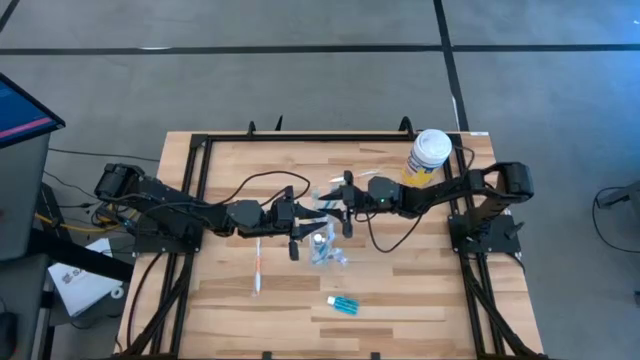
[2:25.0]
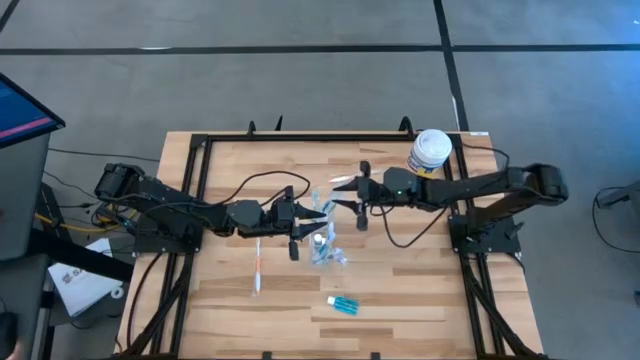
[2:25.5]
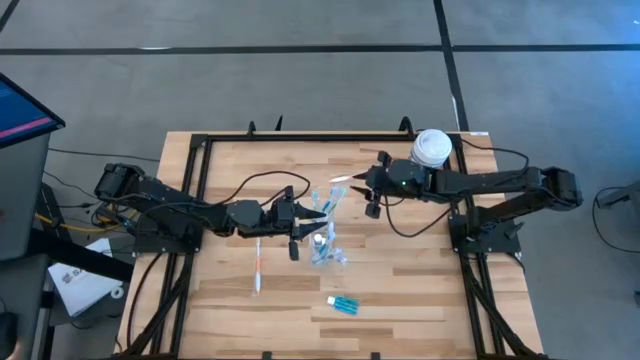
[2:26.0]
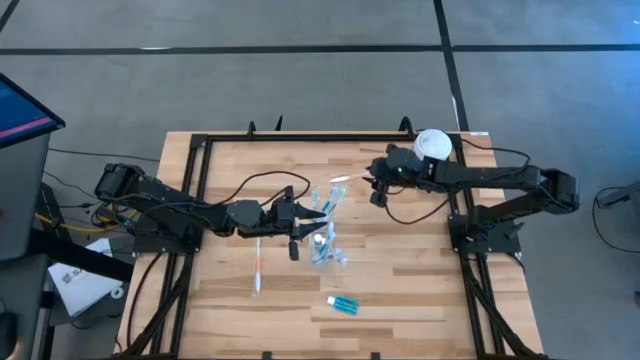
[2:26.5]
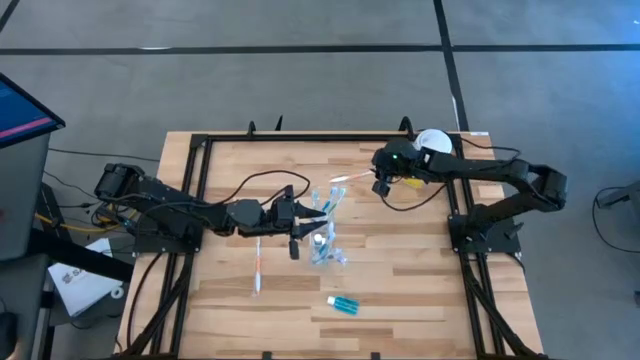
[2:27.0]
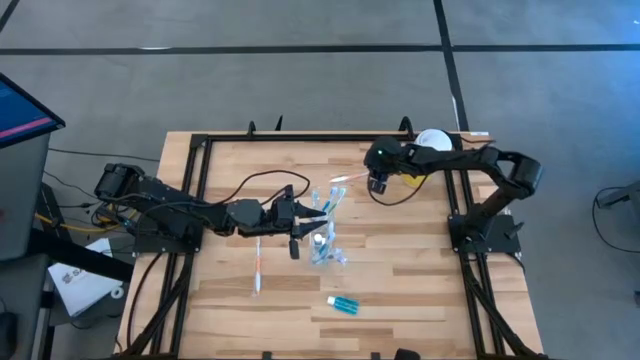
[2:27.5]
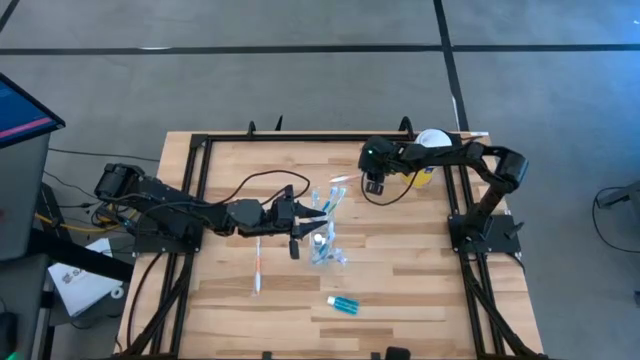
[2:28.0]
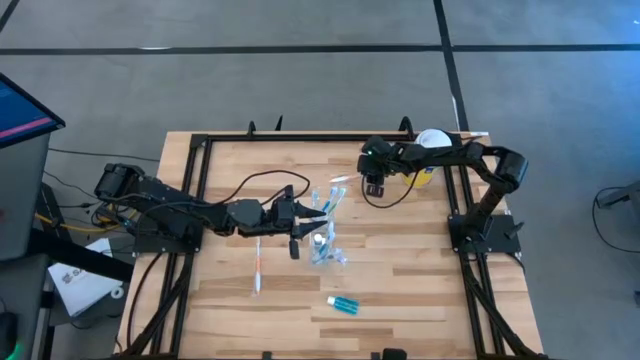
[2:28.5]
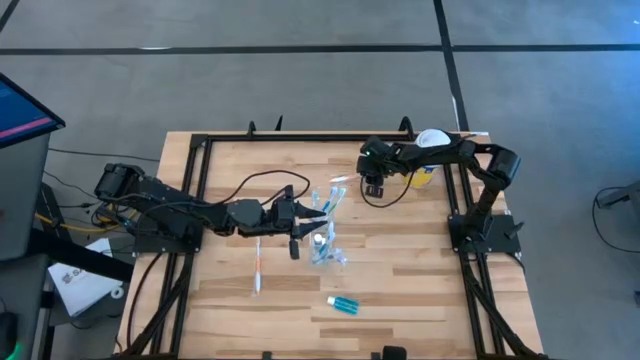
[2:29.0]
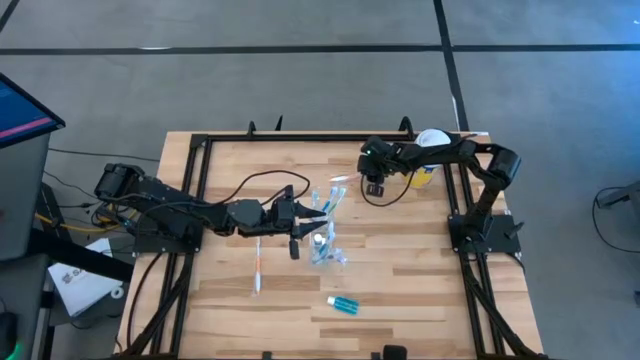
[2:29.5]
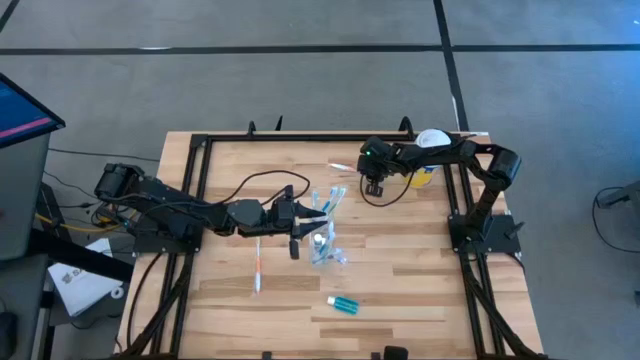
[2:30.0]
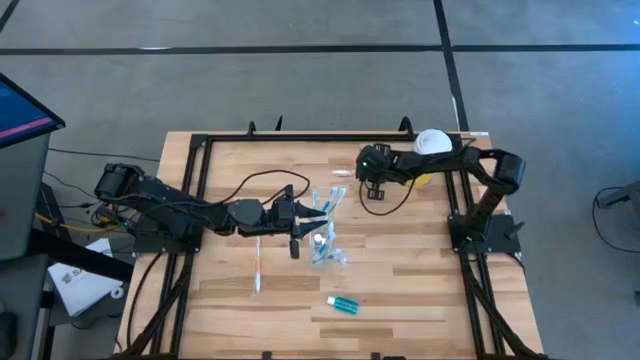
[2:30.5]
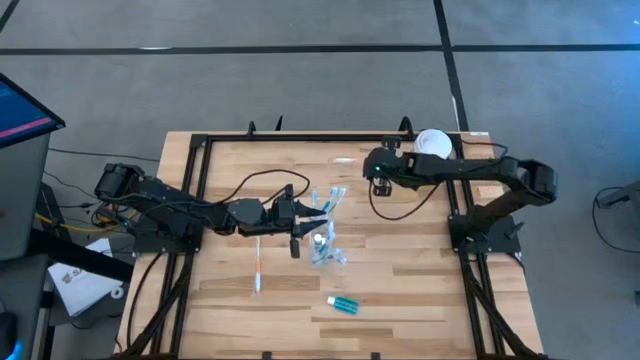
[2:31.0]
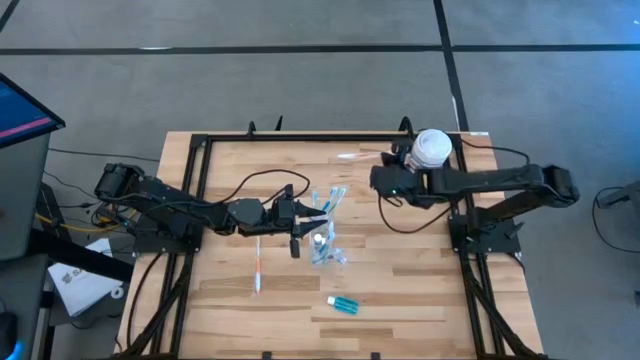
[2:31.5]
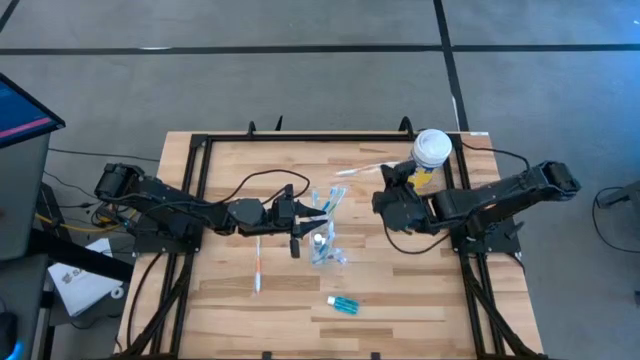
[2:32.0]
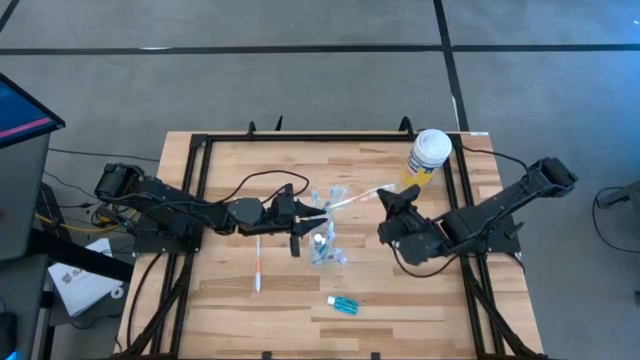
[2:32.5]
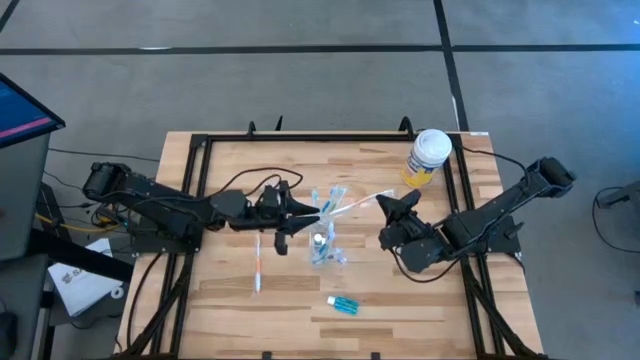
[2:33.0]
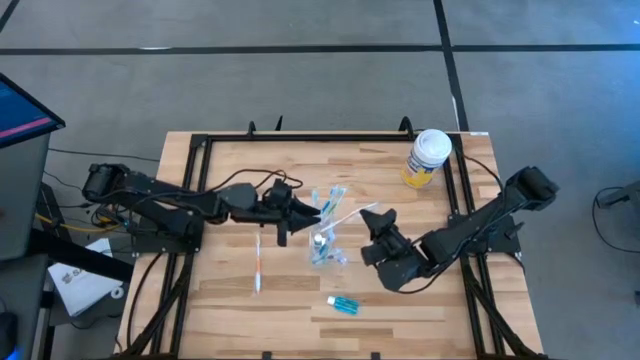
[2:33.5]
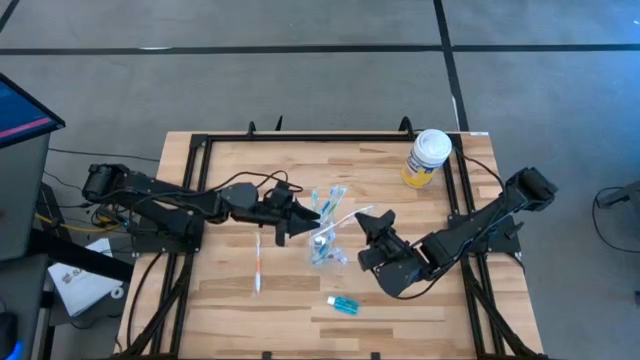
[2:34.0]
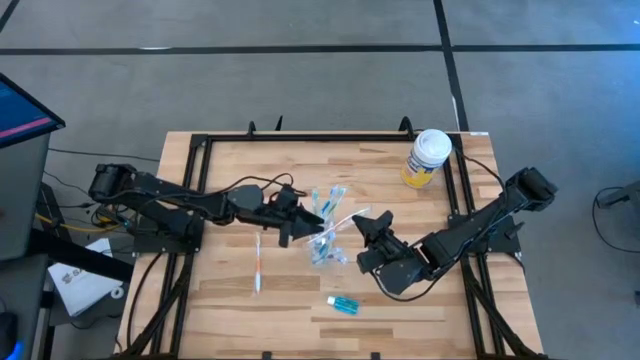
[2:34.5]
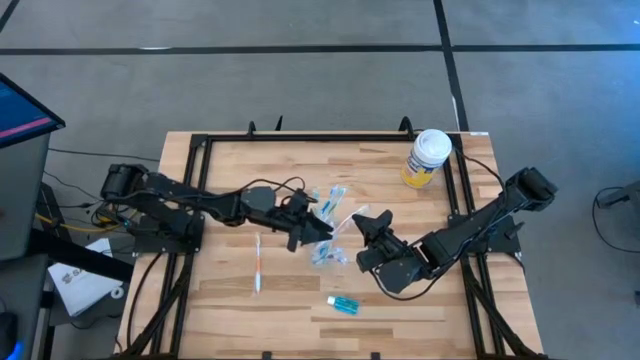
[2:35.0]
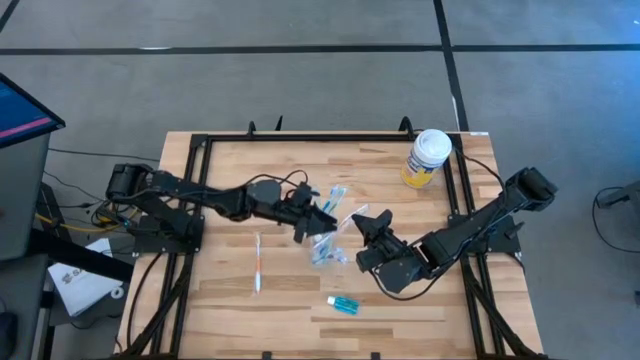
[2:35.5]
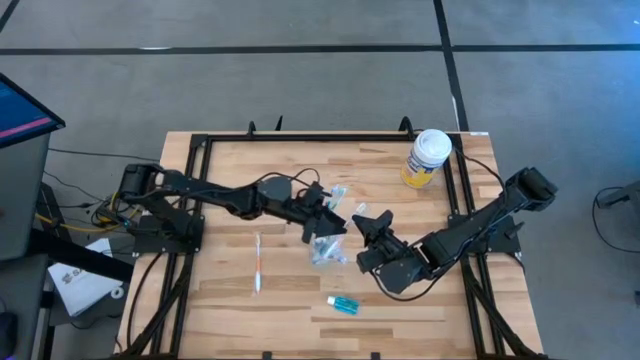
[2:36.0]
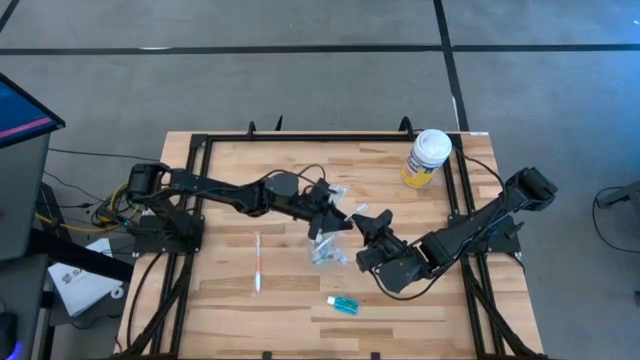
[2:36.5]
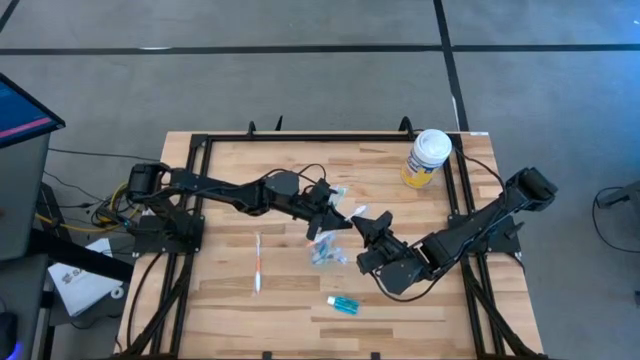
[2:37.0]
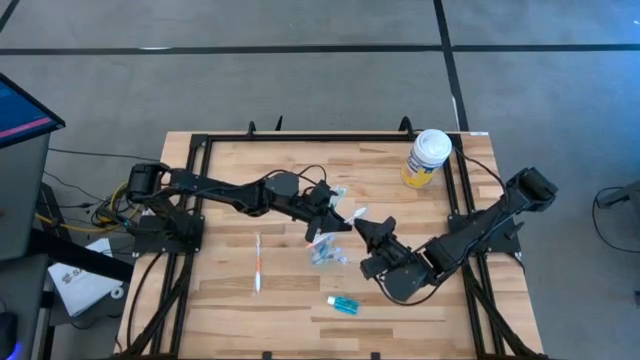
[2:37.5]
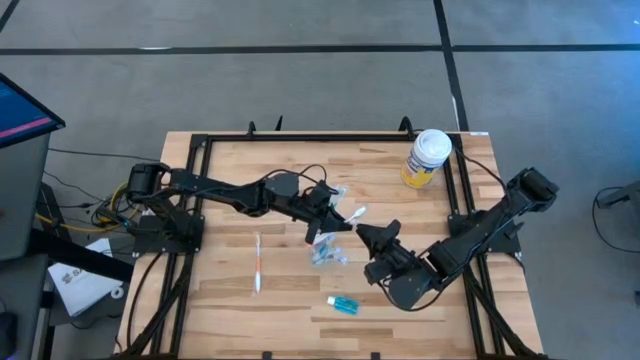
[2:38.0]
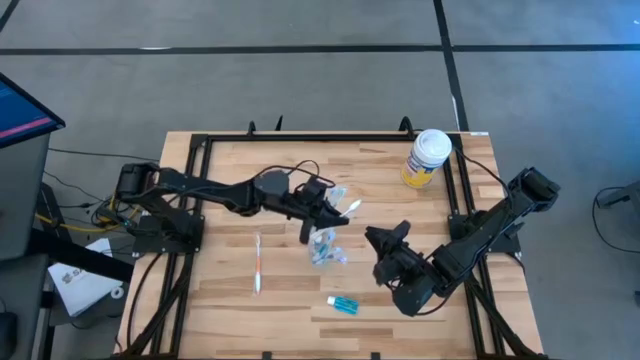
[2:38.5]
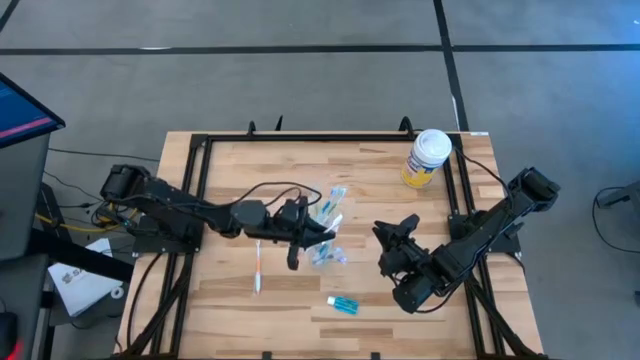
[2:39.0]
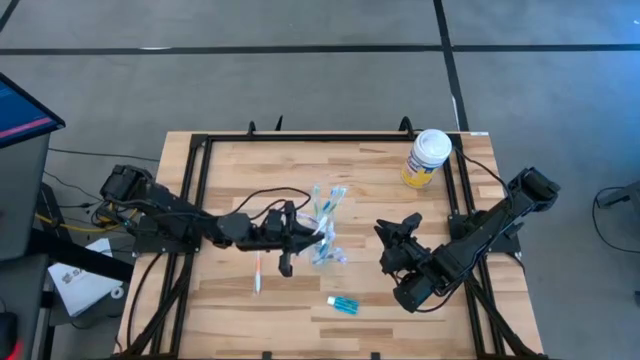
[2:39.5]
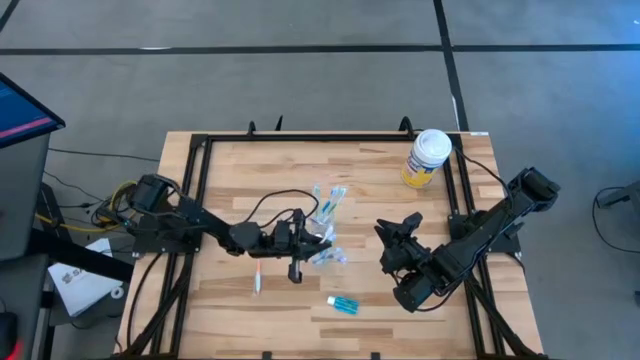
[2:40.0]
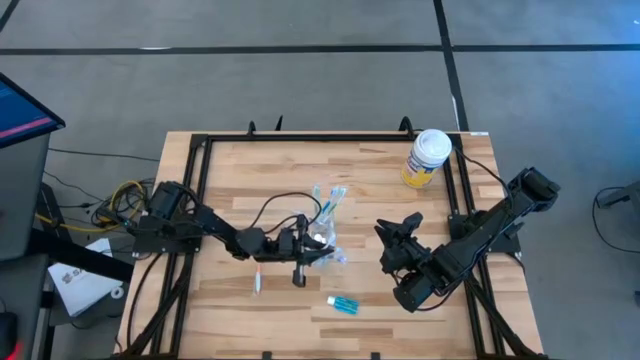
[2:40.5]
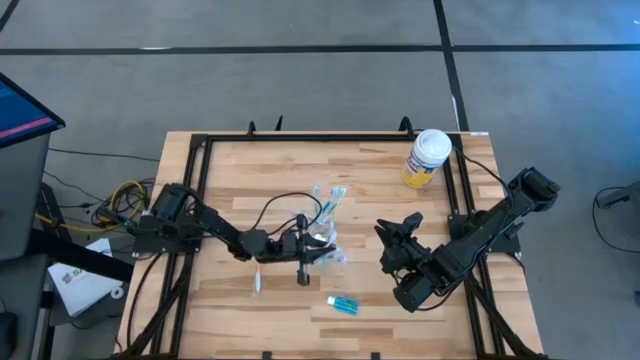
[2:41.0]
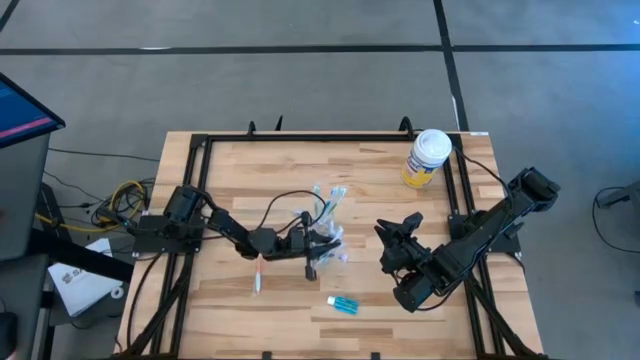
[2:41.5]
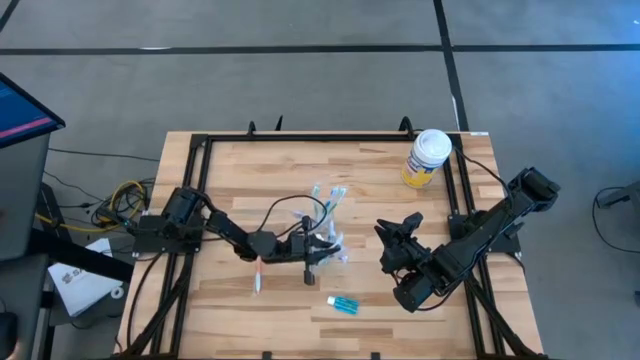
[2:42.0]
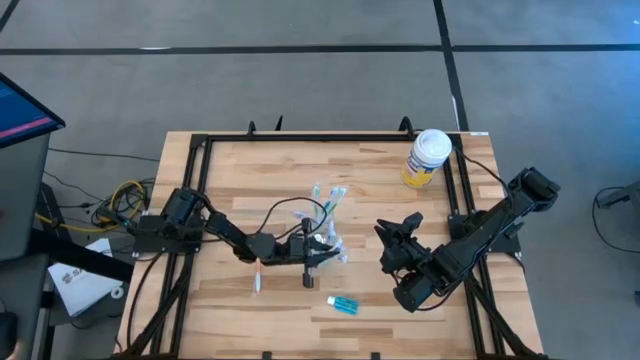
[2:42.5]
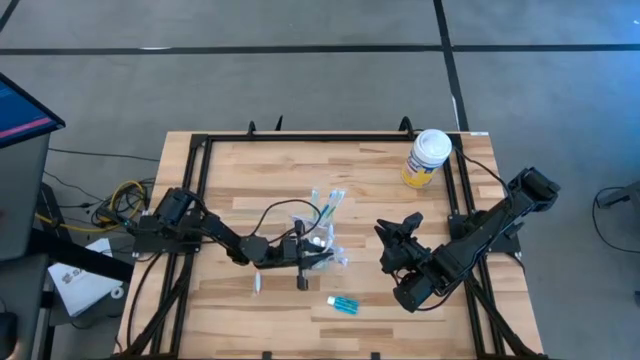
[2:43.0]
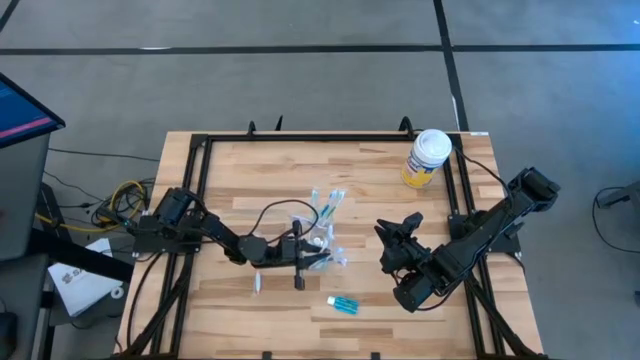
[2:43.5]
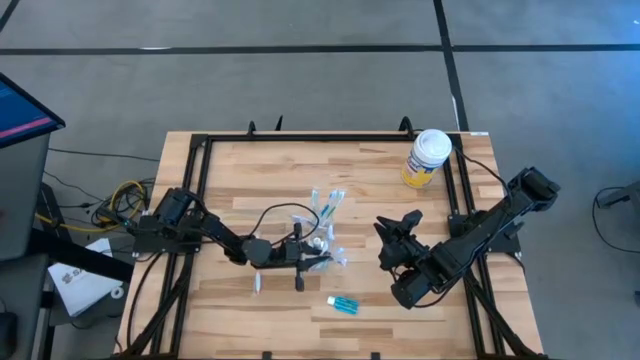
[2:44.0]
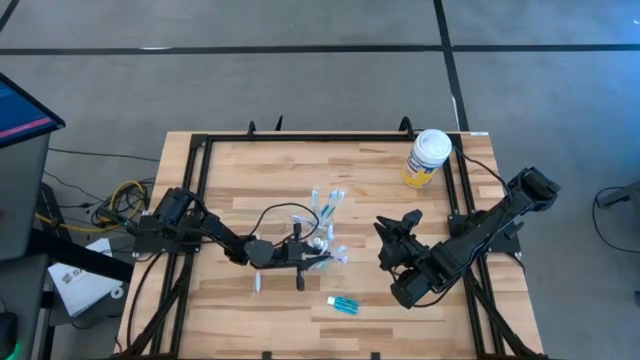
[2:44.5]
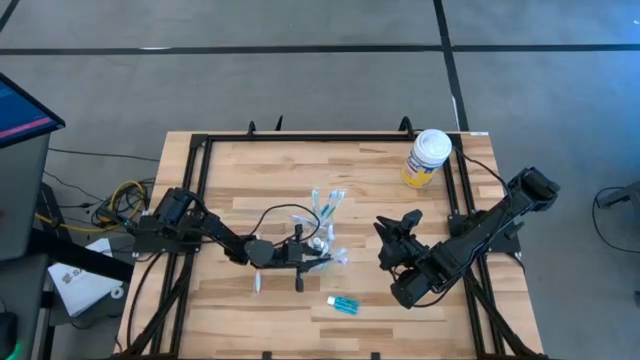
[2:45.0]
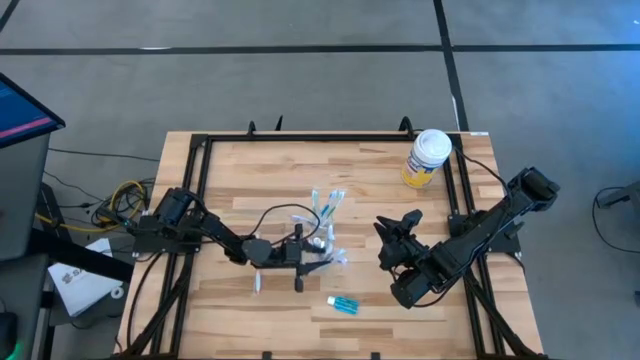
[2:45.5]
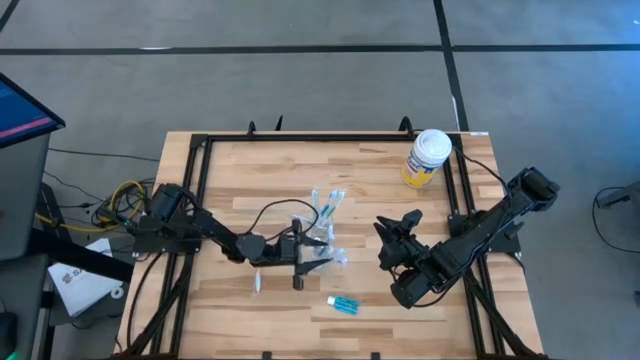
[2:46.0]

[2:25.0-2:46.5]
Task: Pick & Place toothbrushing station
Put the top orange toothbrush into the transparent organizer

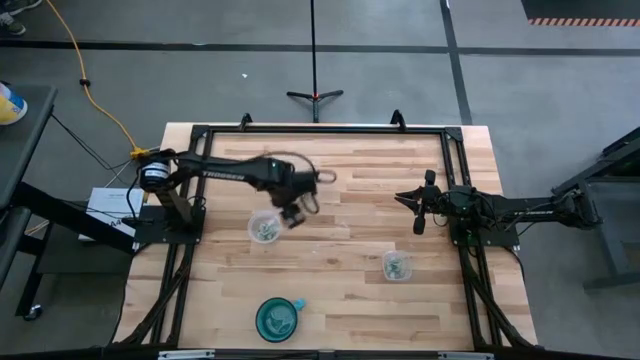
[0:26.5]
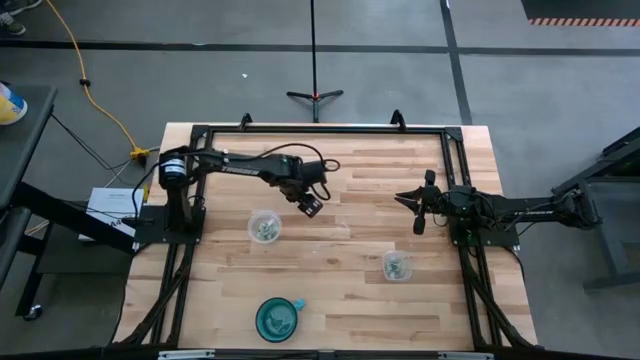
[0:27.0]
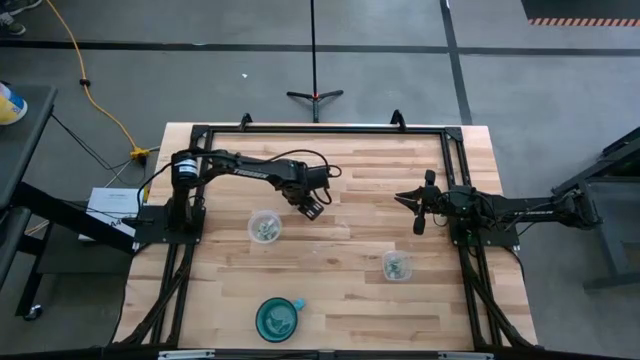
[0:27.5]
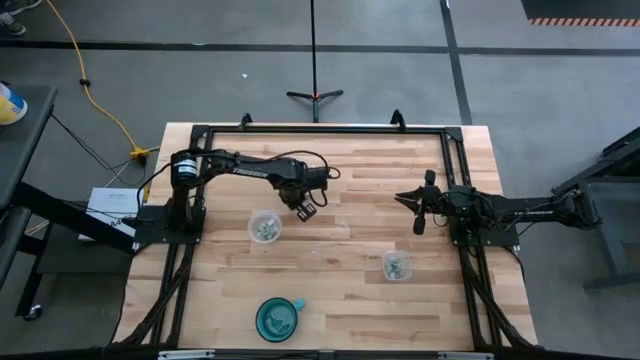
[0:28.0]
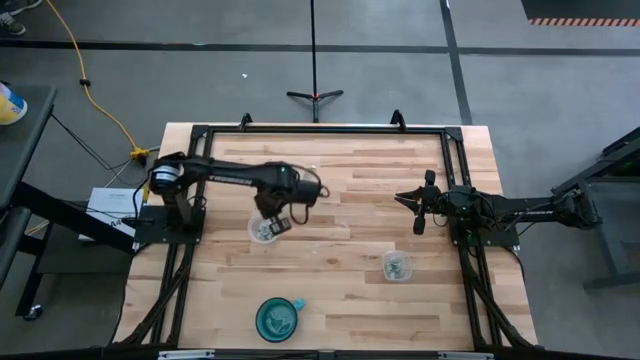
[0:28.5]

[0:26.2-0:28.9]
Task: Sort candy
Put the green candy into the circle transparent bin
